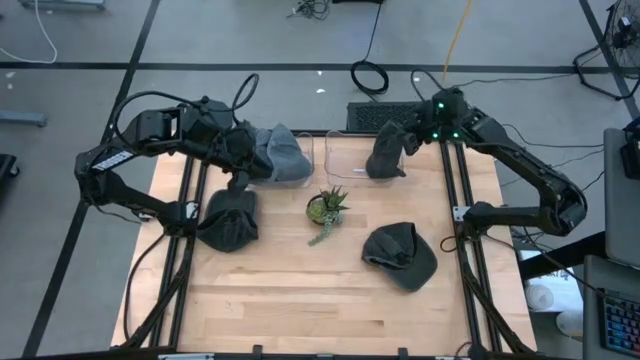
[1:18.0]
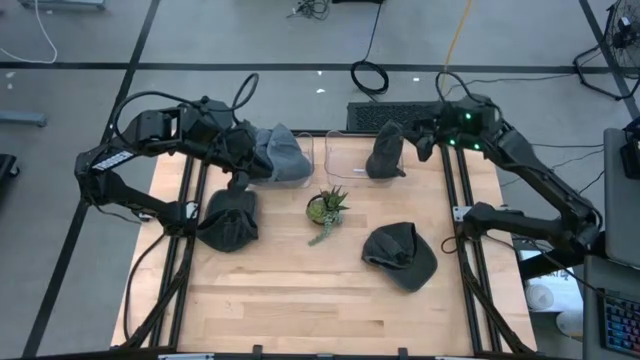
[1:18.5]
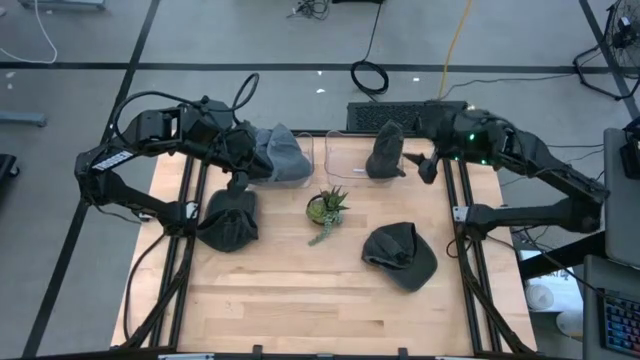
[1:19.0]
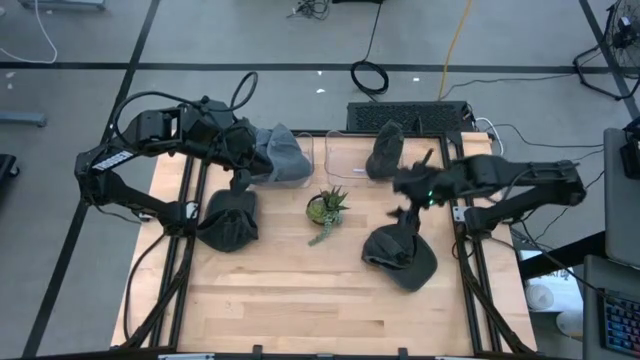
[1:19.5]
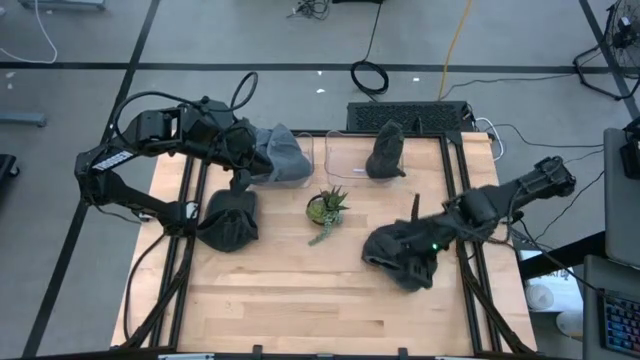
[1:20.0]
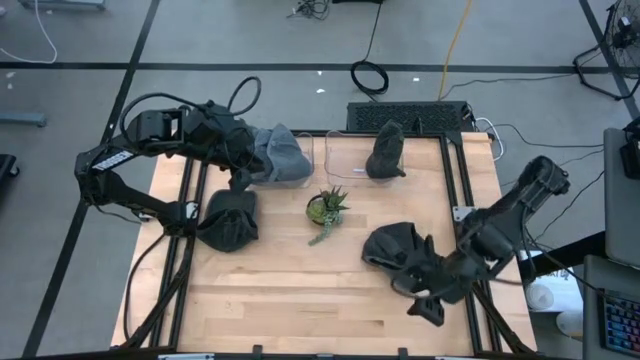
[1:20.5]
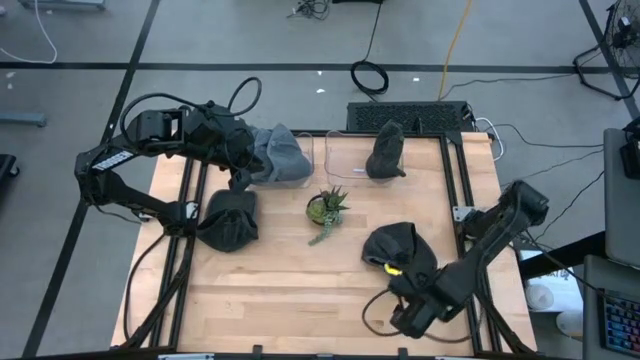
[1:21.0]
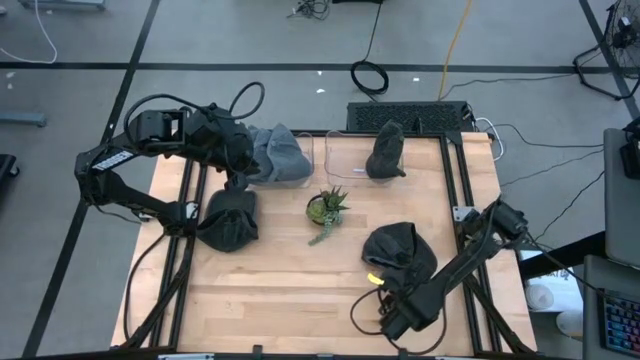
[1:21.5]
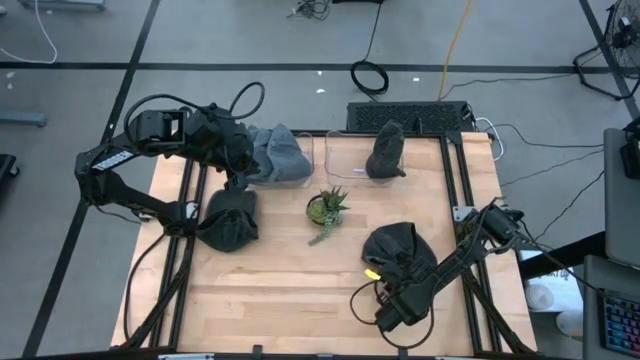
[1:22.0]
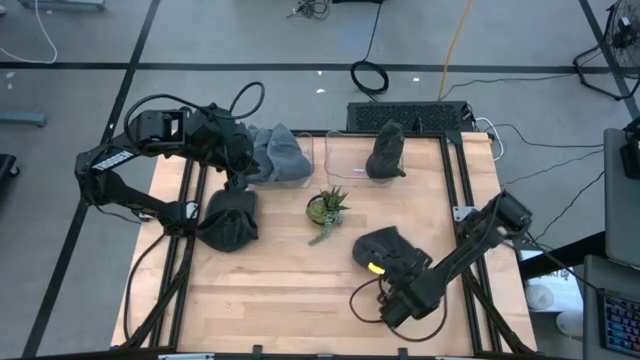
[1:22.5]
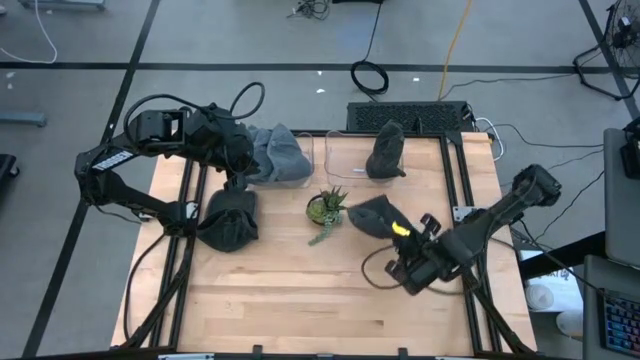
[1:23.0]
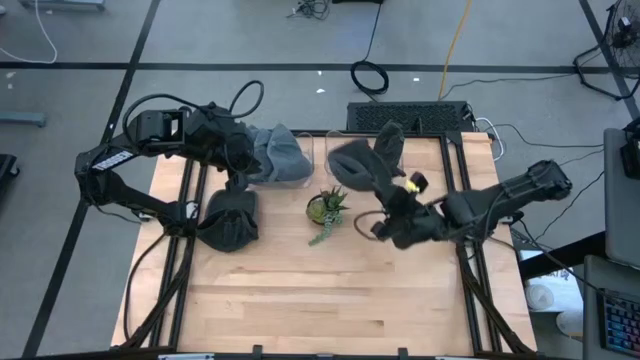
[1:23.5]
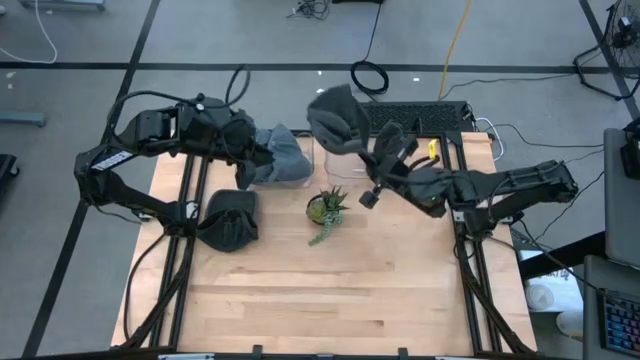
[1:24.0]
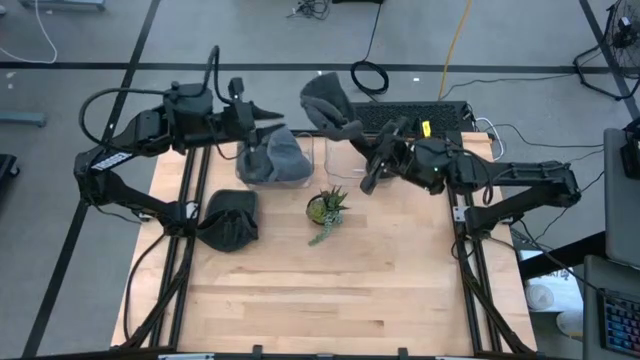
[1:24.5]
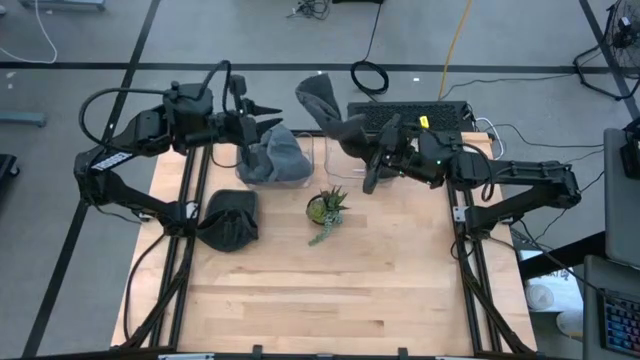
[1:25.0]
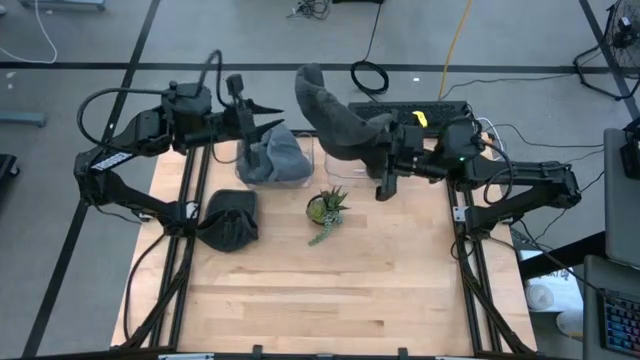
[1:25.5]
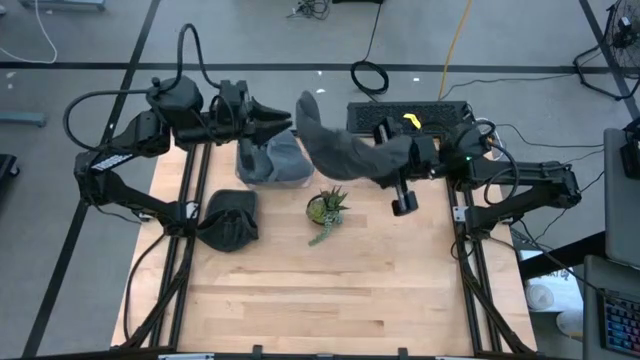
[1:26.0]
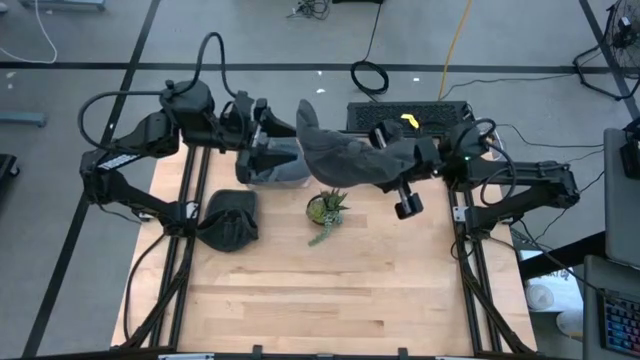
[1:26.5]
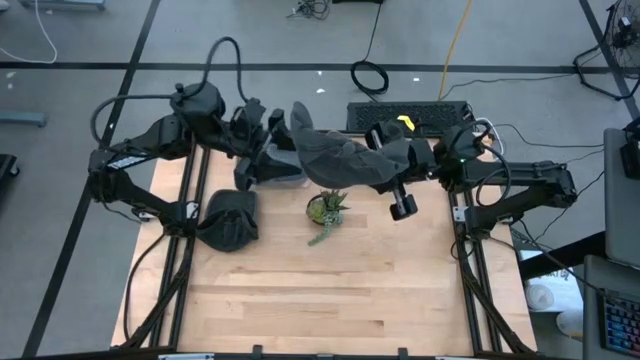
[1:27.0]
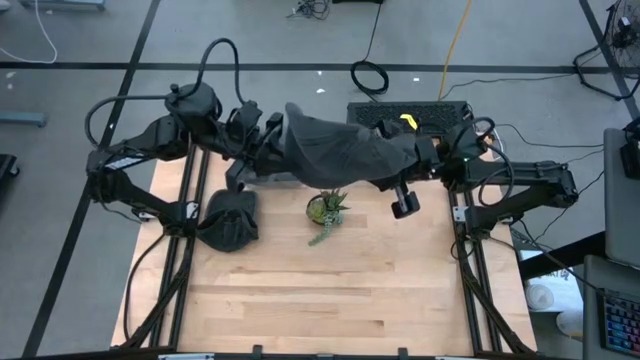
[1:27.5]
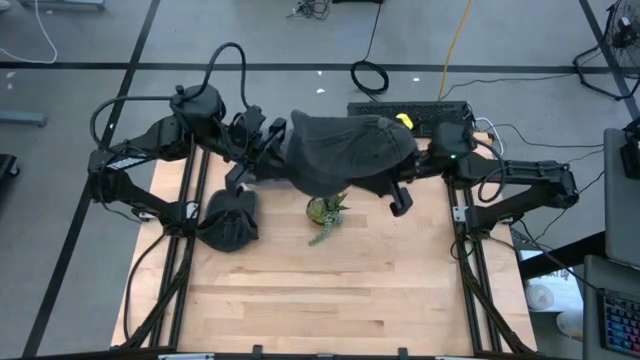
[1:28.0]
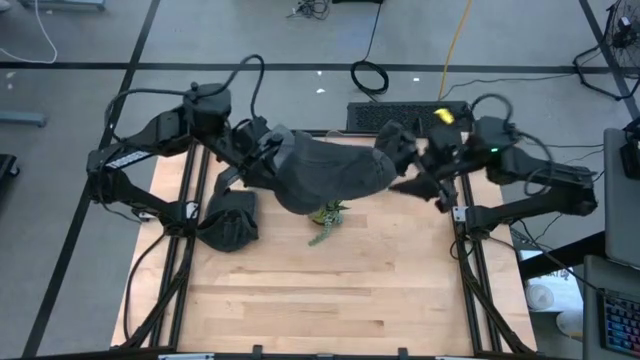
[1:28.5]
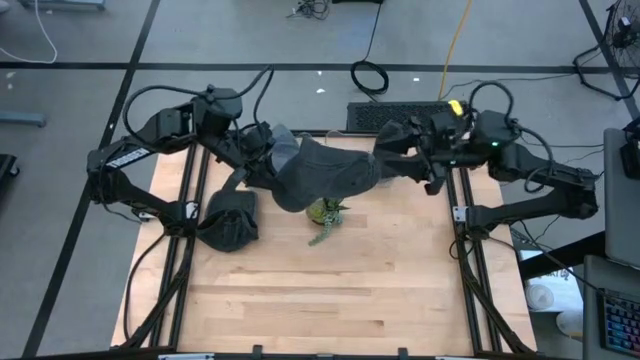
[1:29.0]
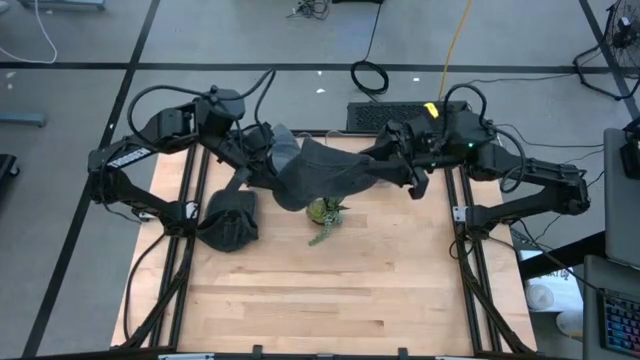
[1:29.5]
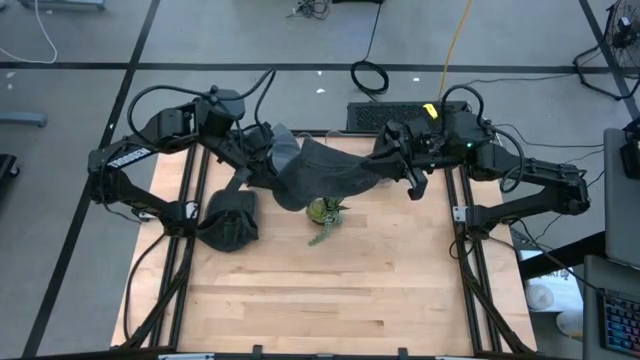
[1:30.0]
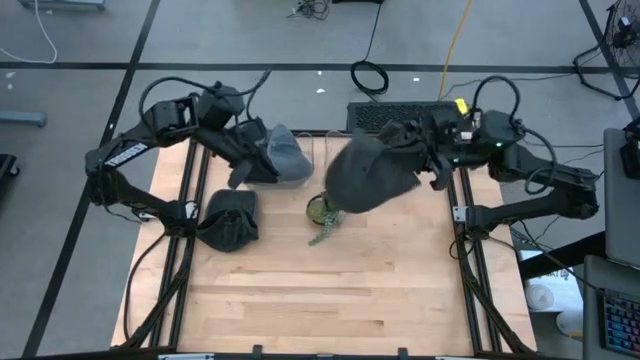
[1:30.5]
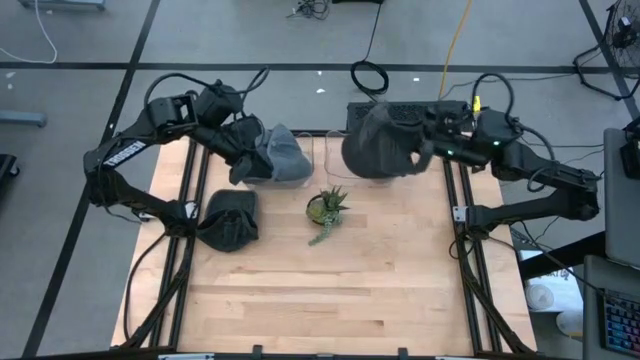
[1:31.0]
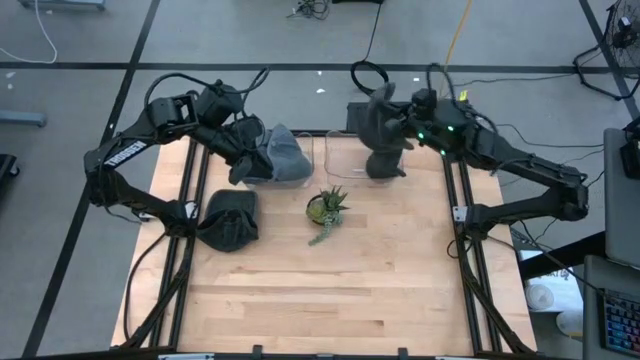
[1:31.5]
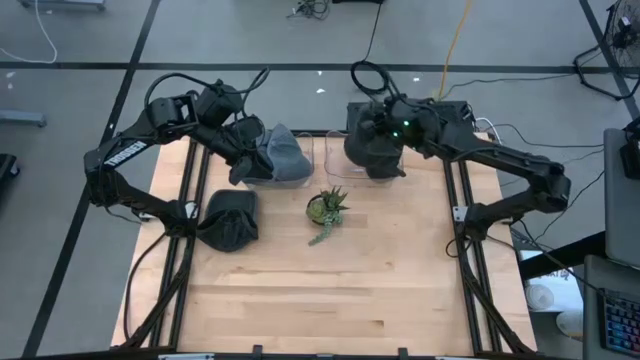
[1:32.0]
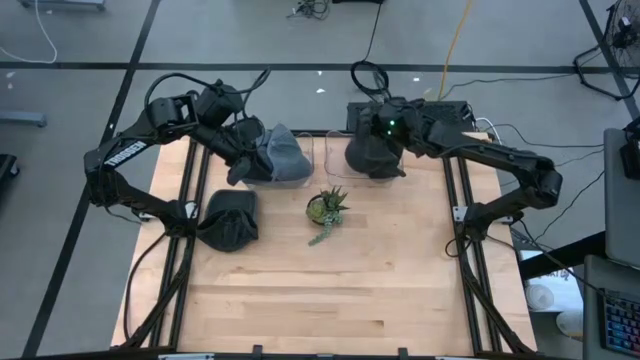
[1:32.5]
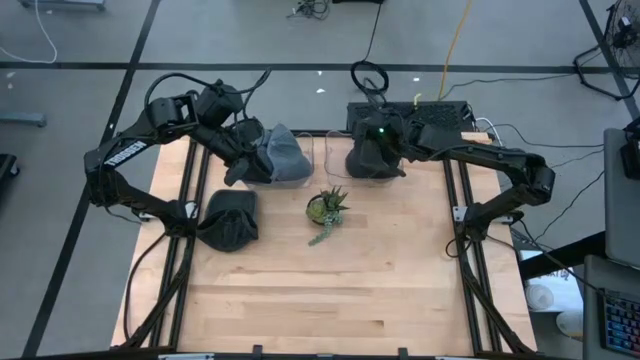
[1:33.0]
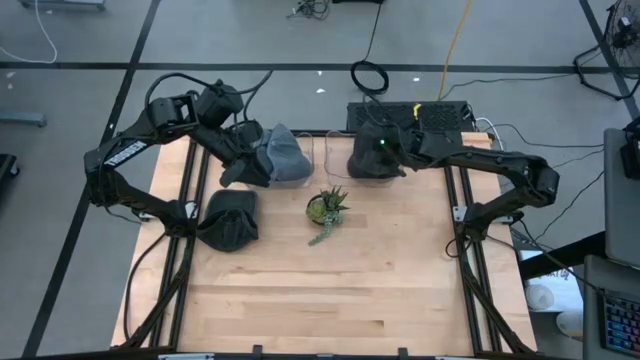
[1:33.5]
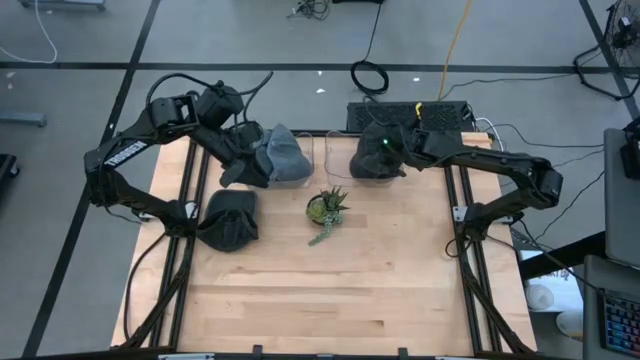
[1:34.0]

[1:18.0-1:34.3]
Task: Pick & Place hat
Put the right black cap into the right transparent bin
